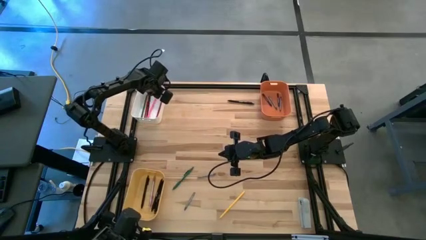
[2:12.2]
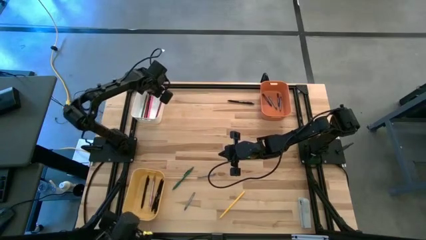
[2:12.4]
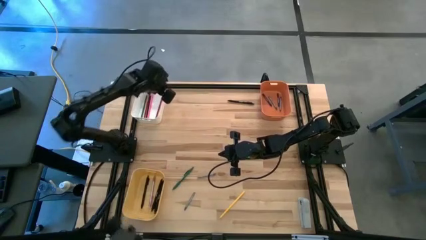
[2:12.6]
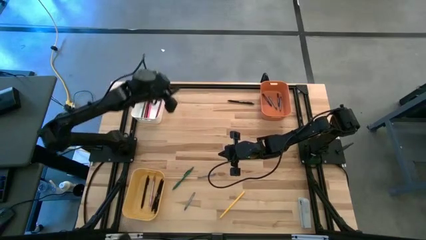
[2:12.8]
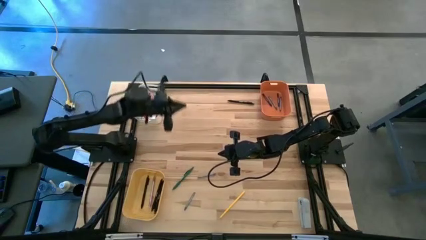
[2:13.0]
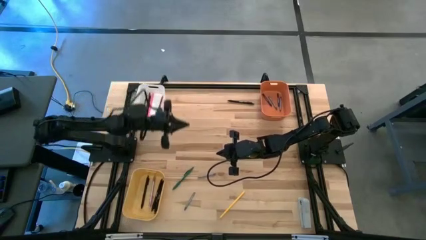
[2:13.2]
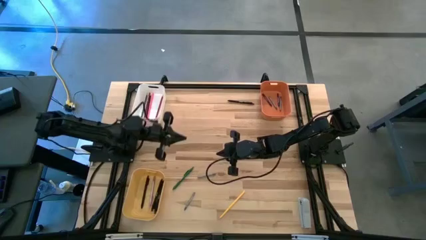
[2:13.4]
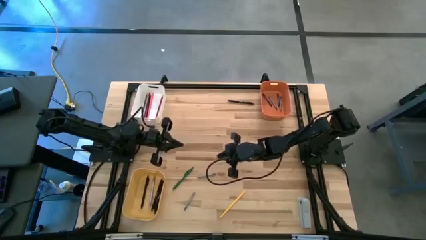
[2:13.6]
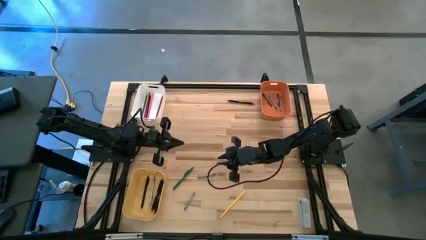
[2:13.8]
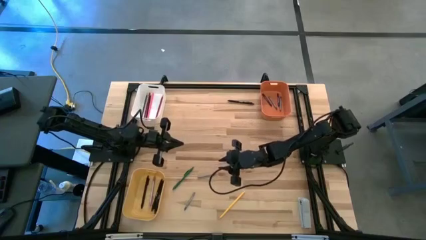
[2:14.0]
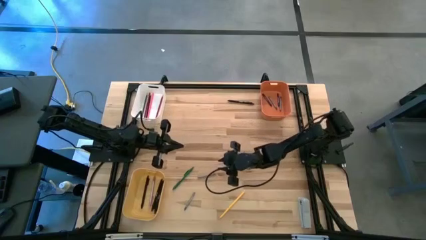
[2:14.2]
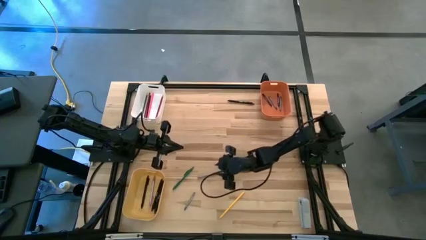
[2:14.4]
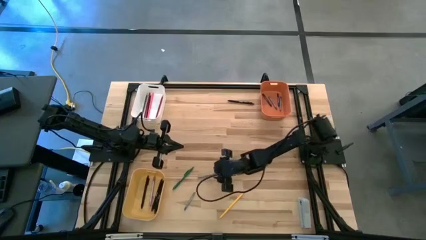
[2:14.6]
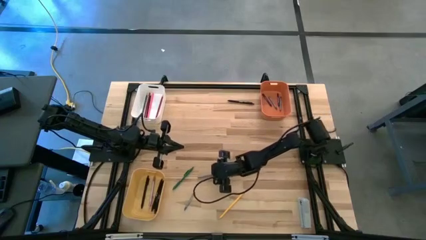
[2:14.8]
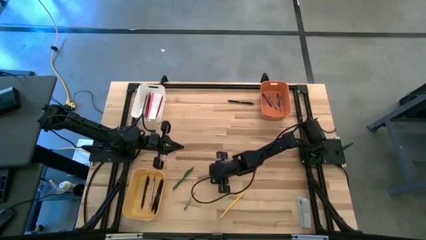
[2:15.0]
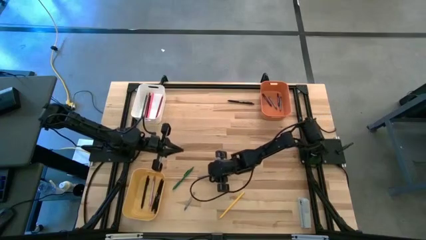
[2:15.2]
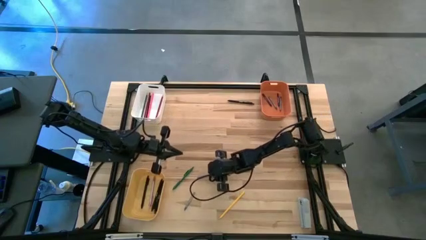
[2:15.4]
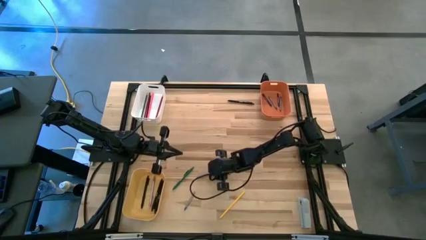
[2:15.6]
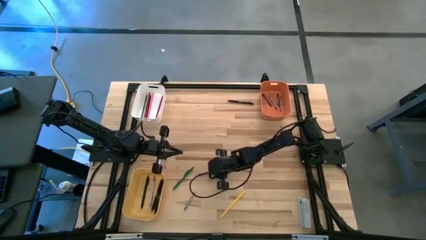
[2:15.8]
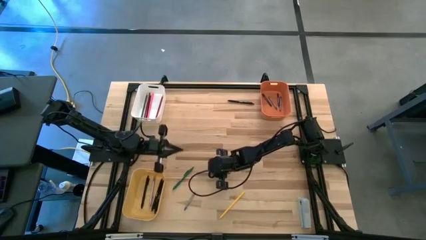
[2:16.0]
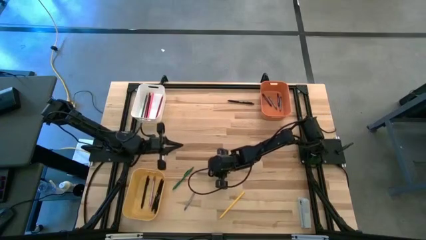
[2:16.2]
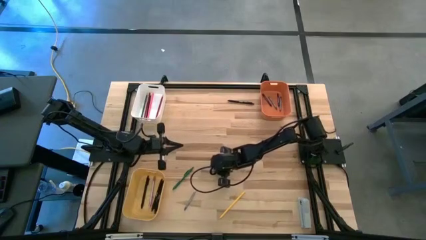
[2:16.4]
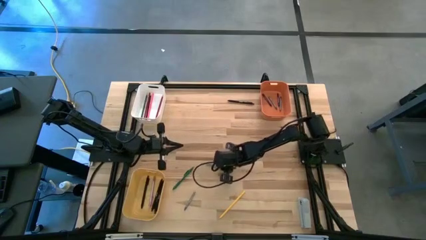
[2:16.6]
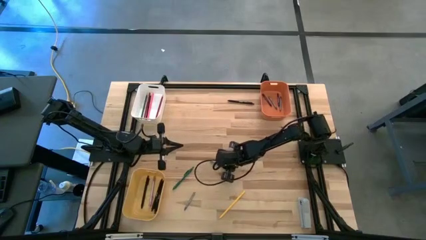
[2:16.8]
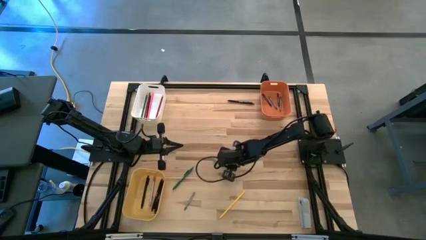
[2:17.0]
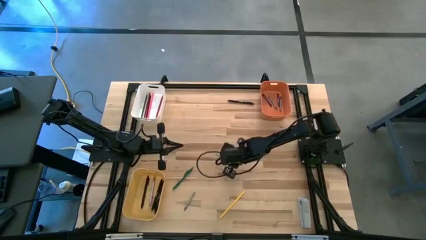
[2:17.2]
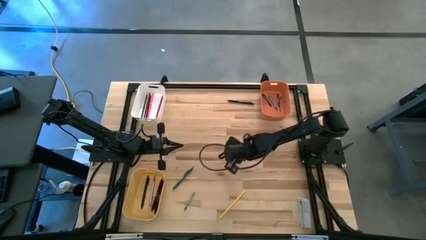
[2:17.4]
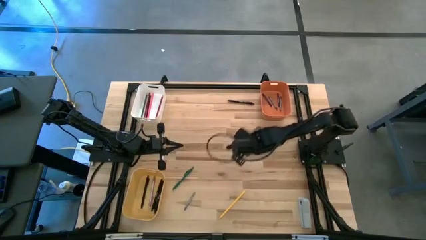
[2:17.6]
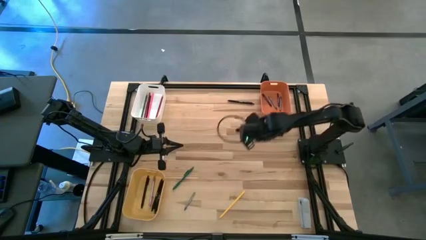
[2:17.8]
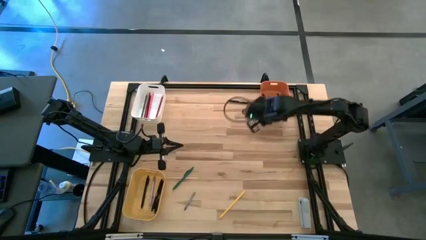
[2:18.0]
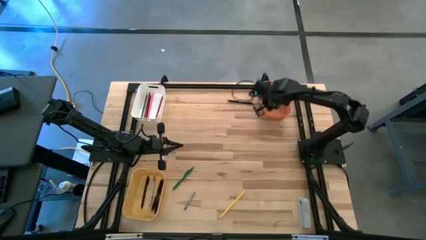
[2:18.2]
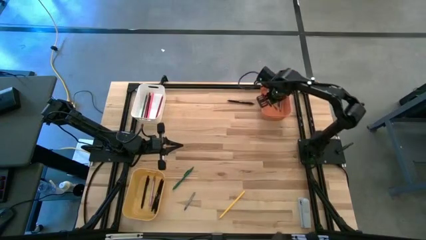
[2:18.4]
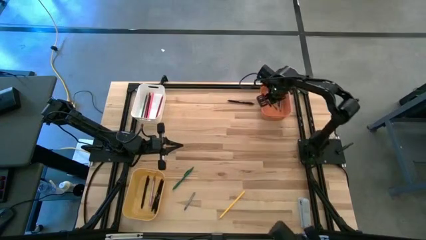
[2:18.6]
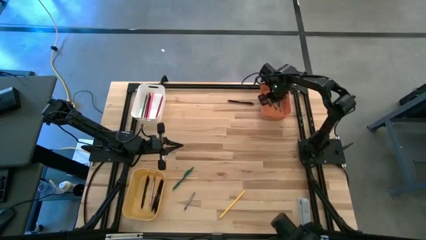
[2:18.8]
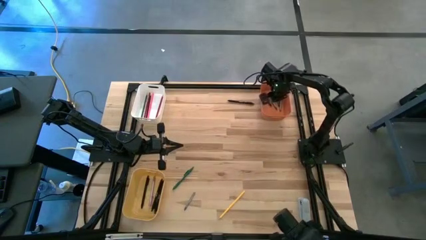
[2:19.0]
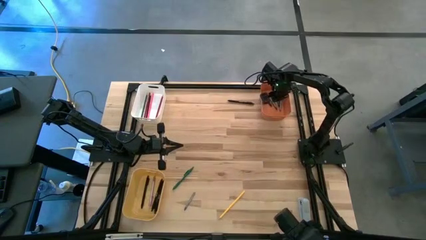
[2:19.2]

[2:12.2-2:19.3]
Task: Sort crayons/erasers/pens/pencils in bins
Put the top gray crayon into the orange bin

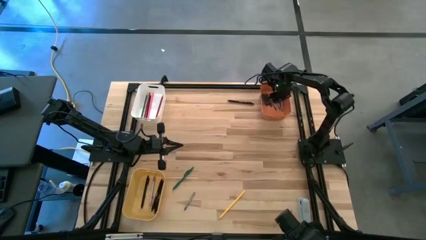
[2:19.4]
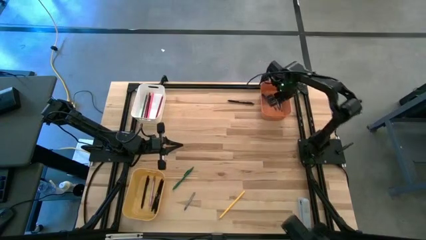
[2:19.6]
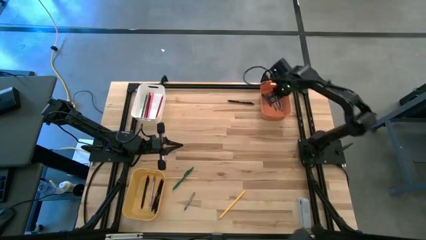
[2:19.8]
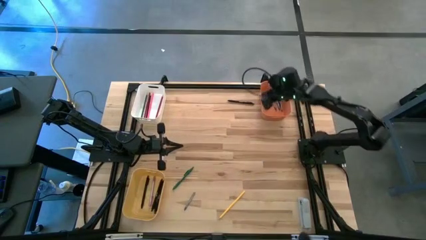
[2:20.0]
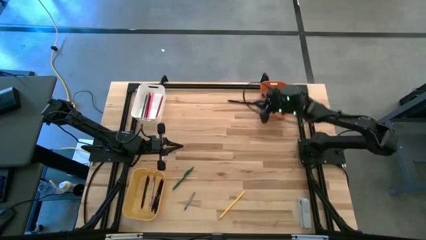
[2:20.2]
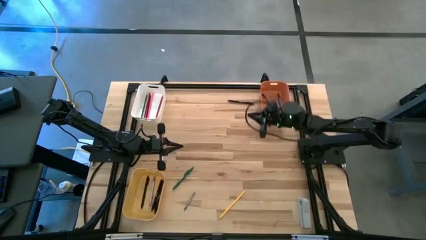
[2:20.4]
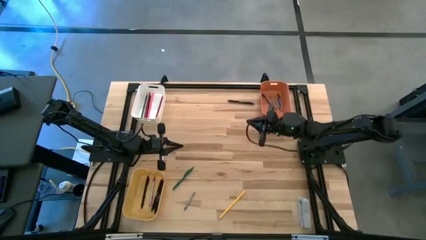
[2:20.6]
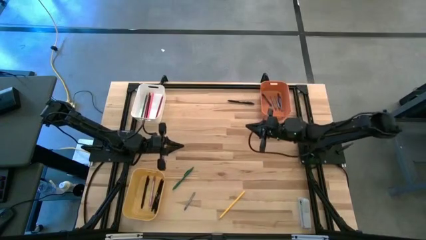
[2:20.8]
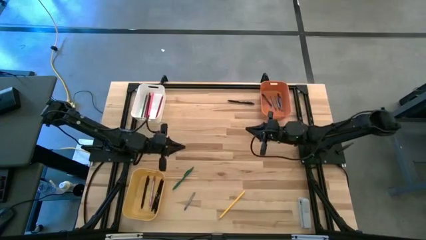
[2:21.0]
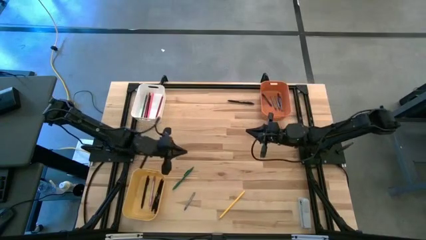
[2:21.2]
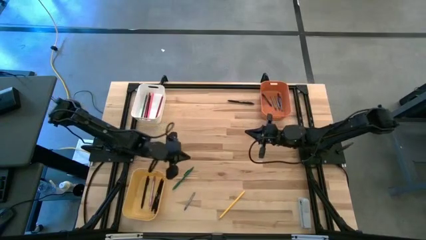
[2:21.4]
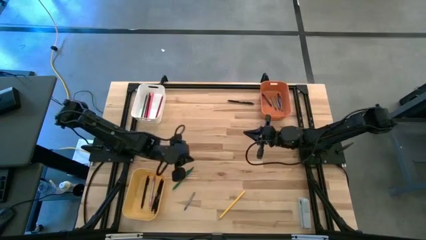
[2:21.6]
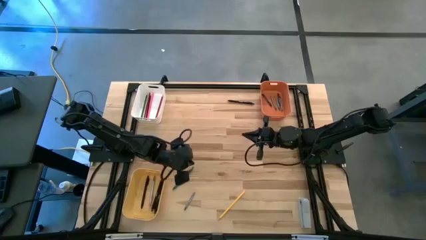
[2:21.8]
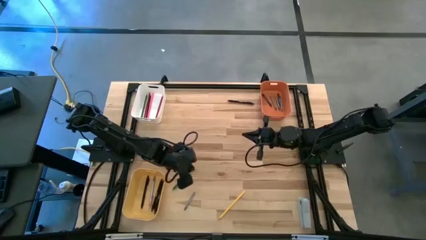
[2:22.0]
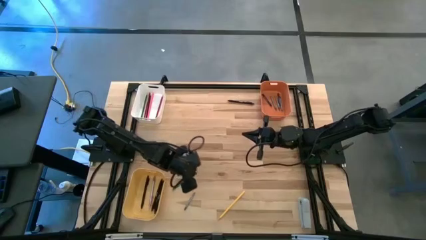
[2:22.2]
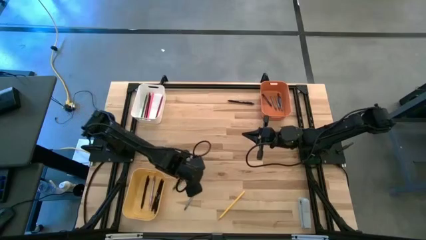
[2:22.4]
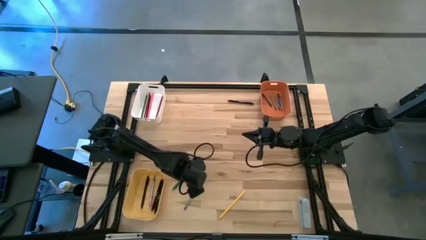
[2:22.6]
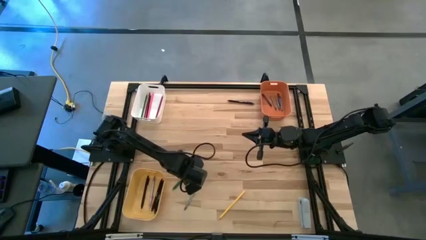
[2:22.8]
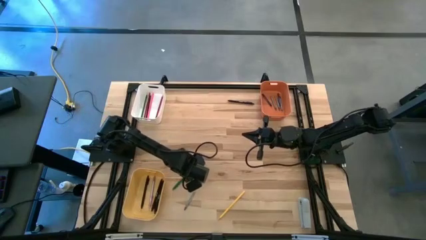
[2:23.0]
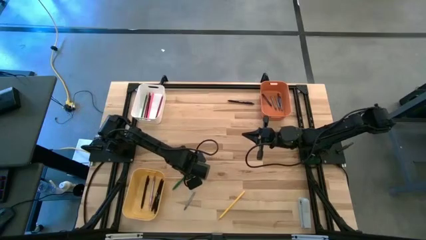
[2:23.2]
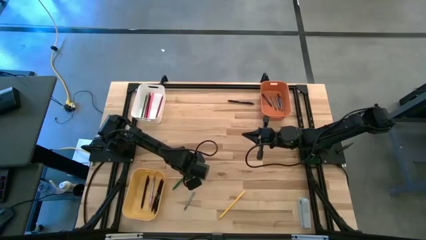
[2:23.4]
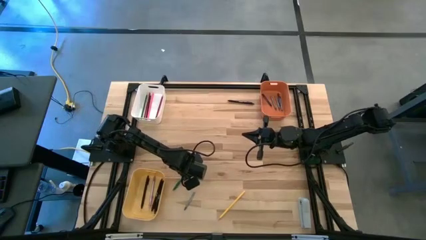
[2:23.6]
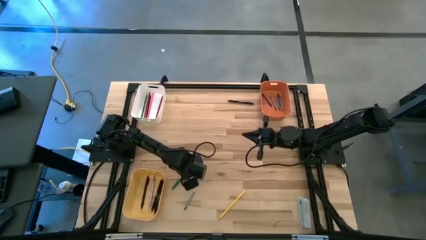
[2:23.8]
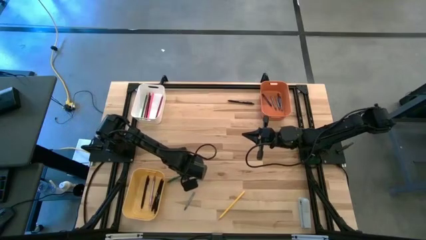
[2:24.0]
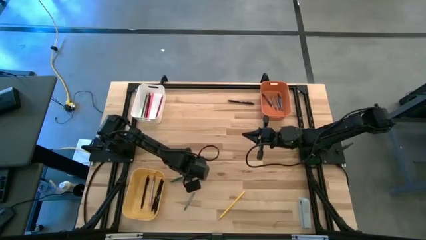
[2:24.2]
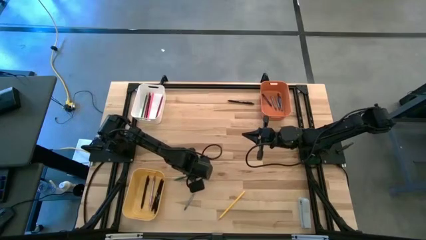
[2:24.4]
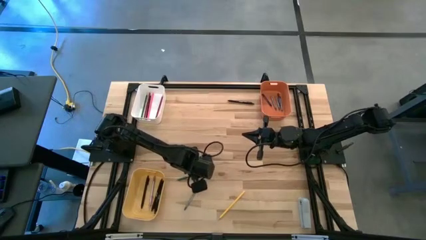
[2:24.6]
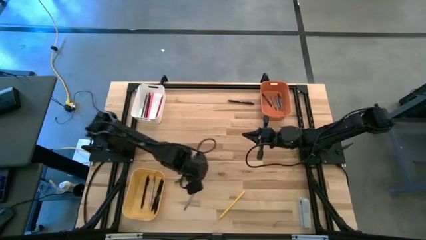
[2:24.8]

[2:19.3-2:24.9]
Put the green pen into the yellow bin

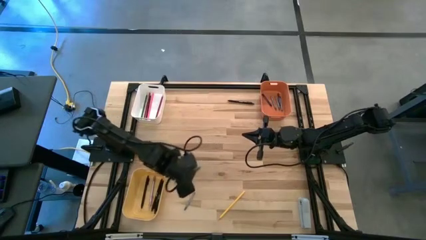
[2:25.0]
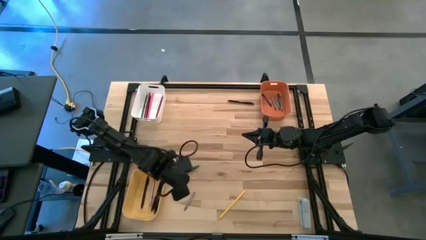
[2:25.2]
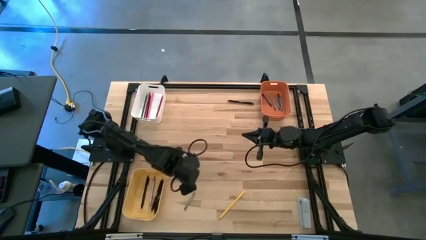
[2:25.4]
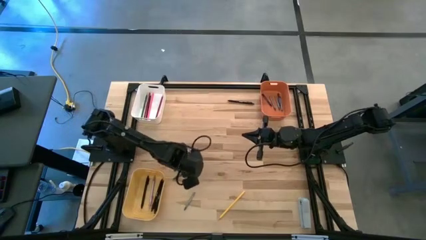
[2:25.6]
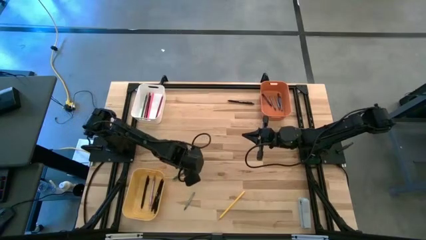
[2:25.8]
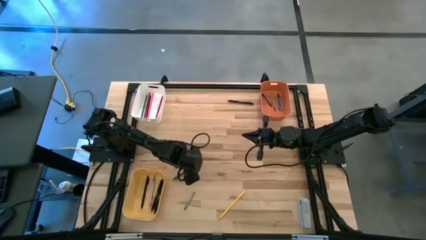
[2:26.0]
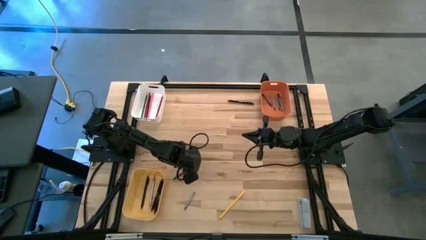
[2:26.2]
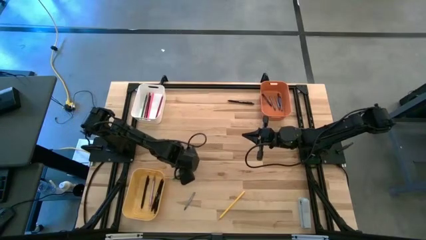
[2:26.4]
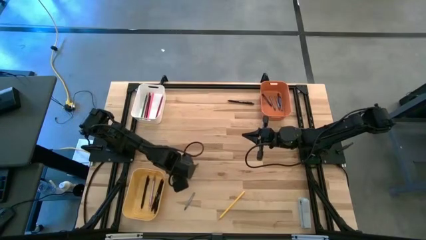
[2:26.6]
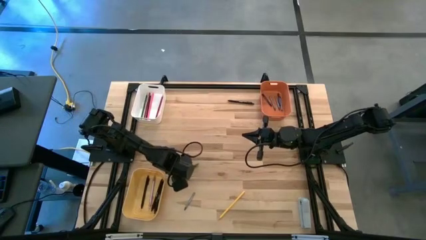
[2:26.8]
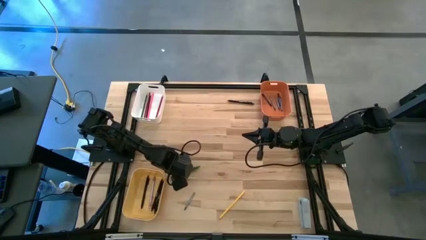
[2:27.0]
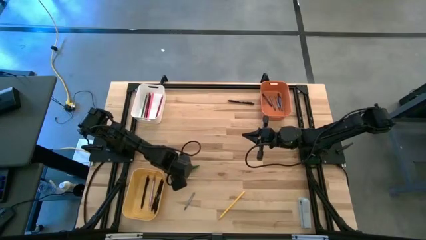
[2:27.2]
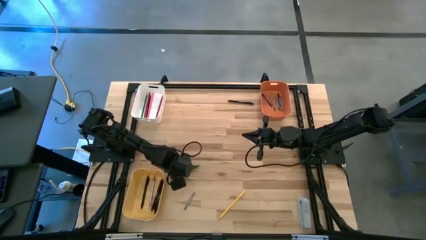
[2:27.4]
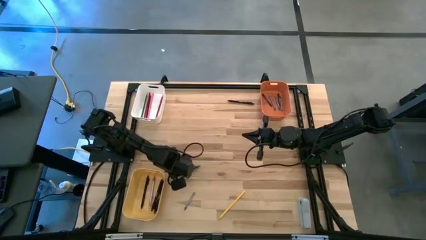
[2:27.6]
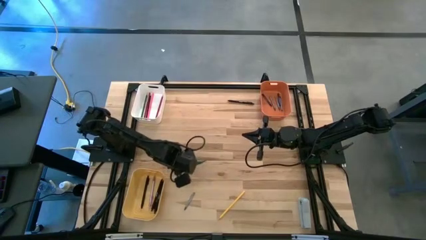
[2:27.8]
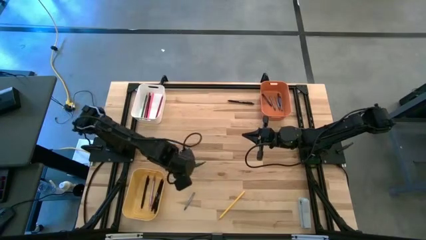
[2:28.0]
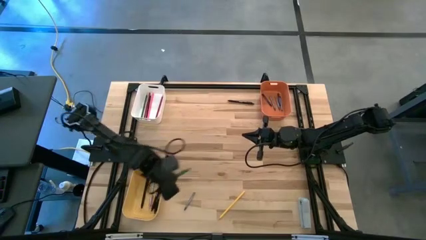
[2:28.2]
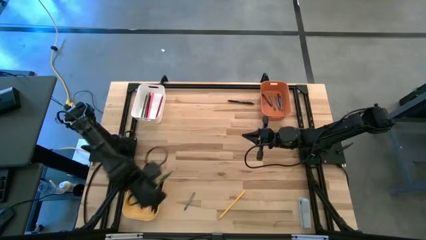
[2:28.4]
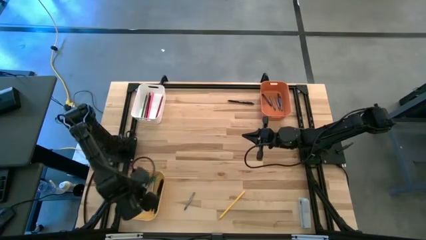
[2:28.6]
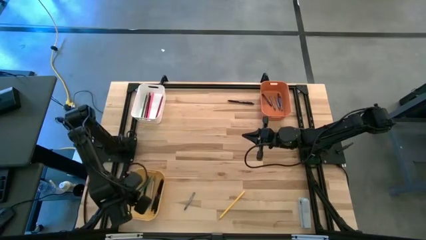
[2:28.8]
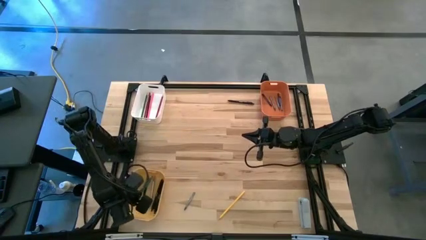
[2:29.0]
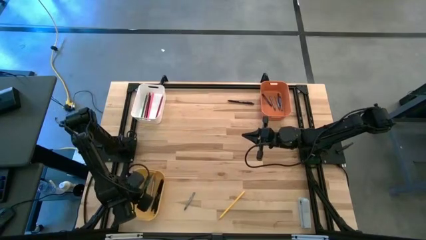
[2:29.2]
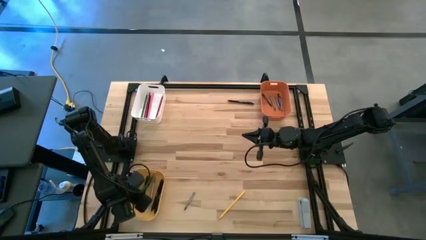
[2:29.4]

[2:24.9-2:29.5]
Put the green pen into the yellow bin
